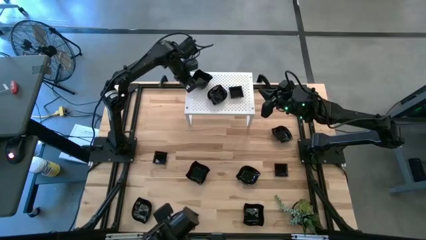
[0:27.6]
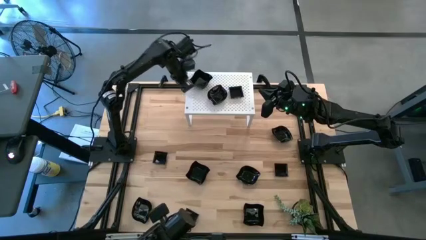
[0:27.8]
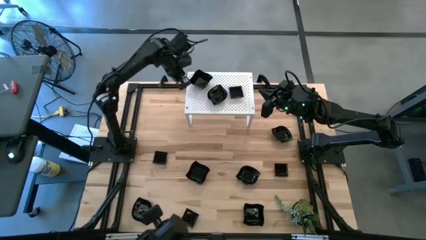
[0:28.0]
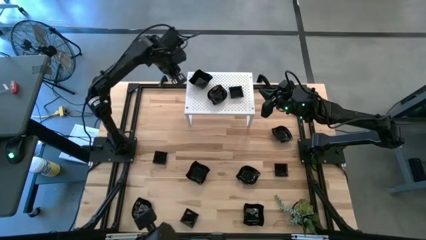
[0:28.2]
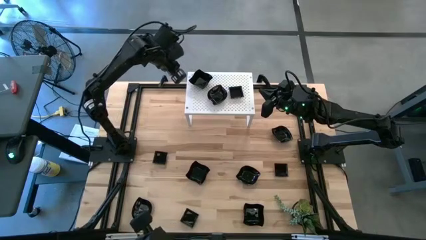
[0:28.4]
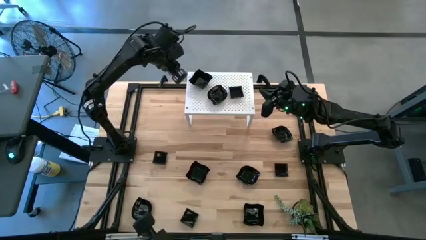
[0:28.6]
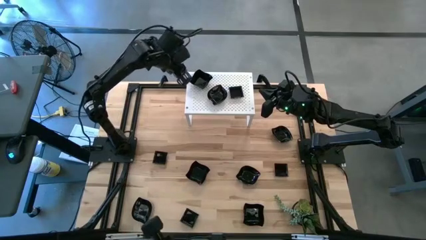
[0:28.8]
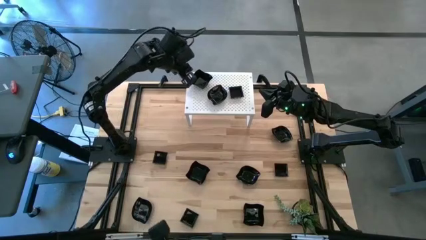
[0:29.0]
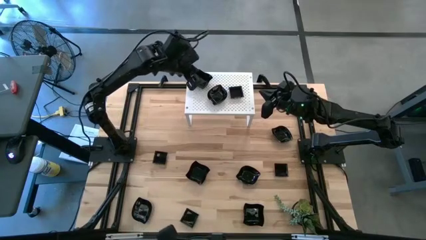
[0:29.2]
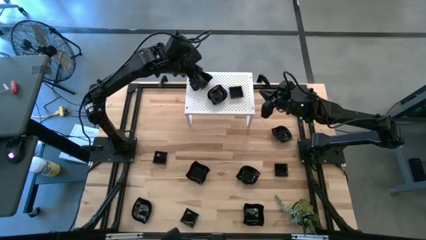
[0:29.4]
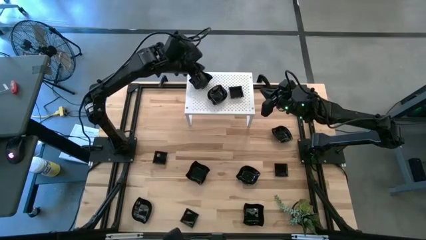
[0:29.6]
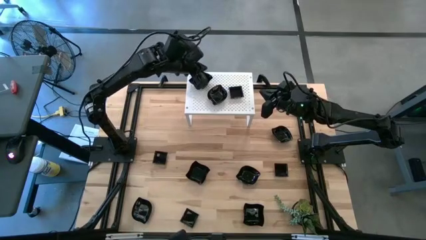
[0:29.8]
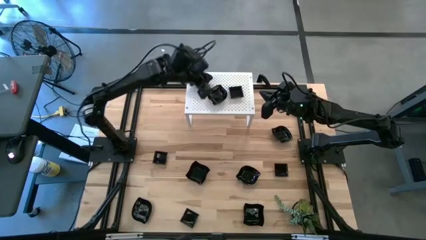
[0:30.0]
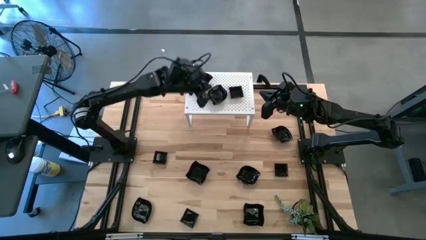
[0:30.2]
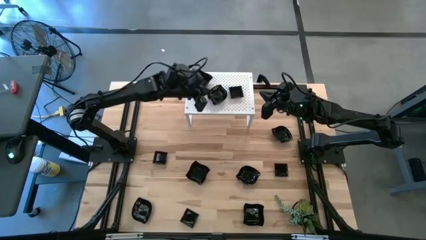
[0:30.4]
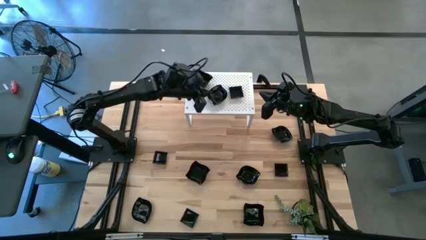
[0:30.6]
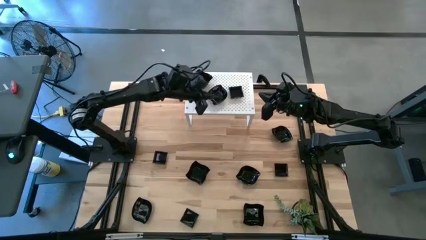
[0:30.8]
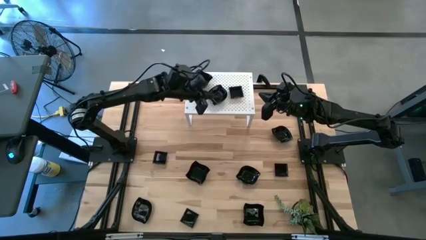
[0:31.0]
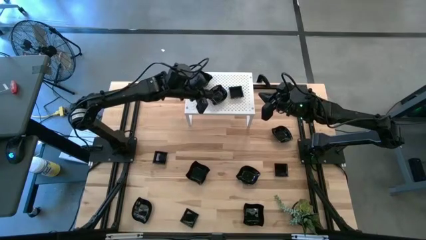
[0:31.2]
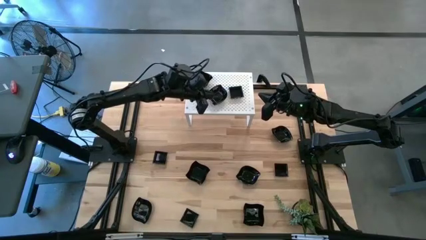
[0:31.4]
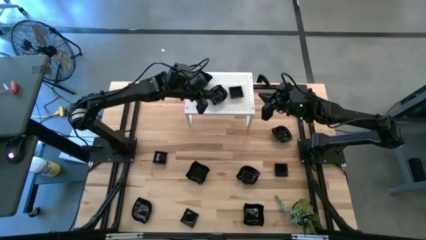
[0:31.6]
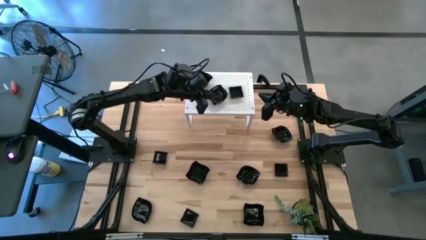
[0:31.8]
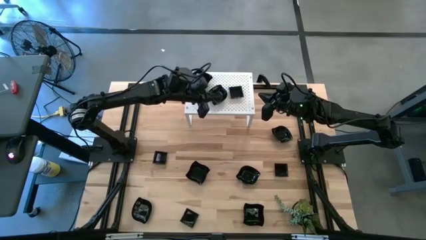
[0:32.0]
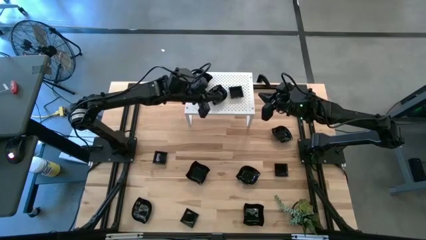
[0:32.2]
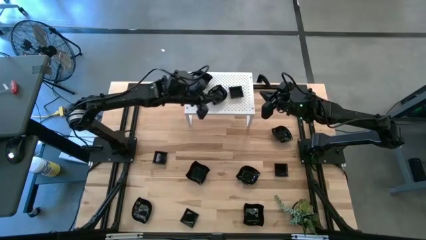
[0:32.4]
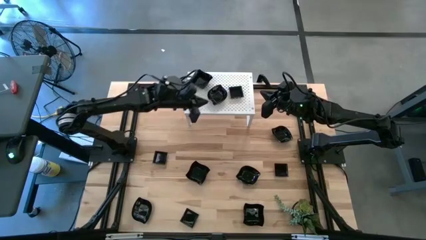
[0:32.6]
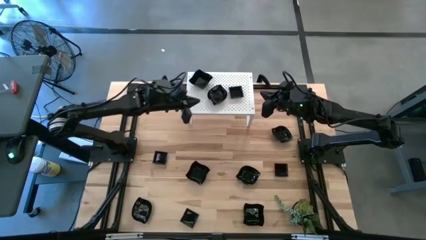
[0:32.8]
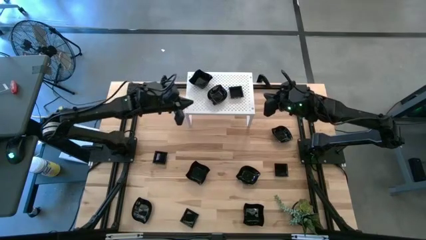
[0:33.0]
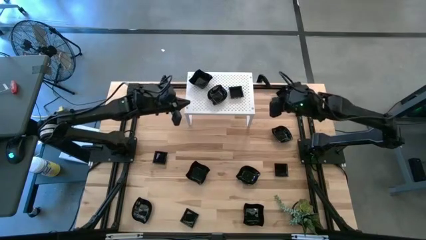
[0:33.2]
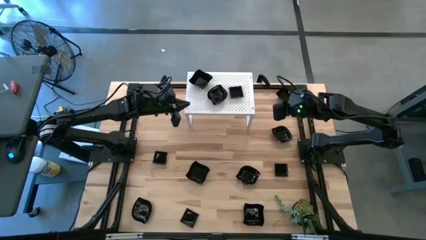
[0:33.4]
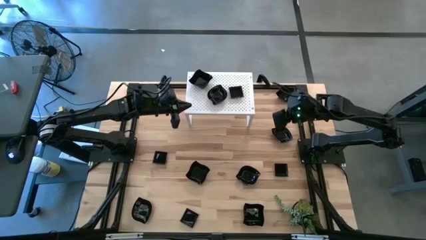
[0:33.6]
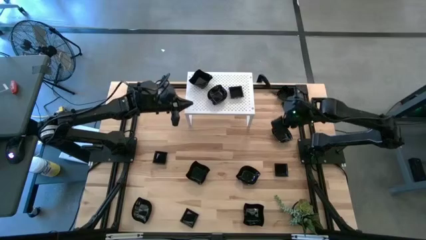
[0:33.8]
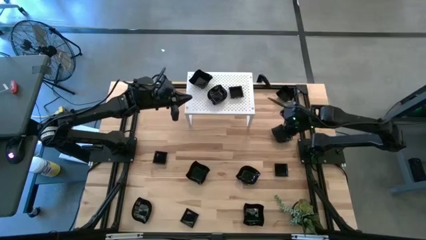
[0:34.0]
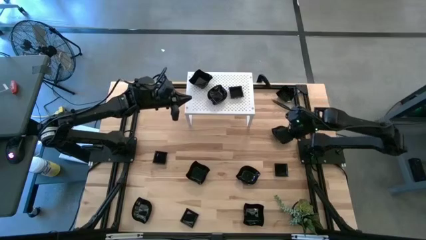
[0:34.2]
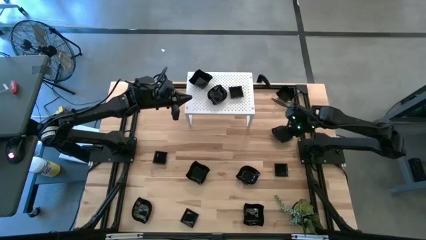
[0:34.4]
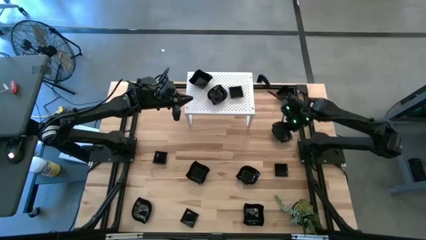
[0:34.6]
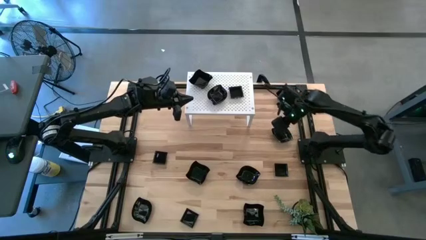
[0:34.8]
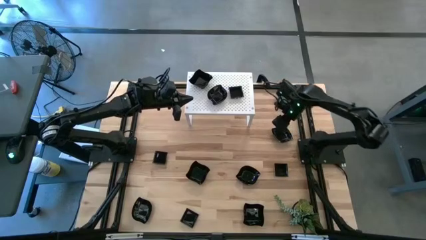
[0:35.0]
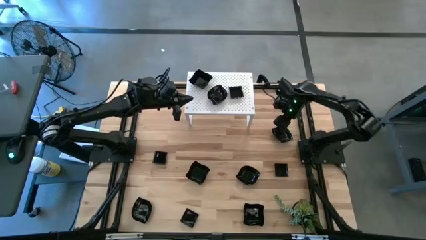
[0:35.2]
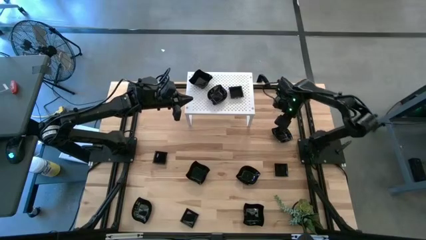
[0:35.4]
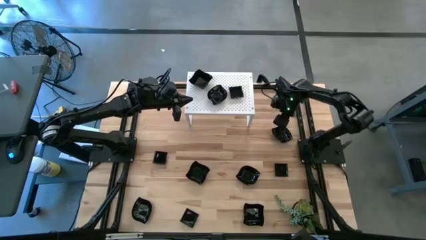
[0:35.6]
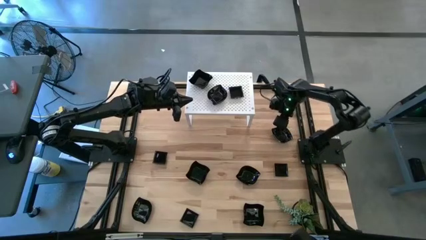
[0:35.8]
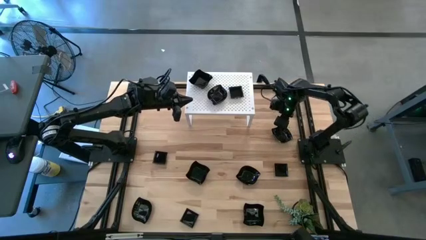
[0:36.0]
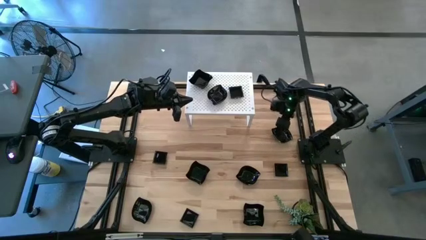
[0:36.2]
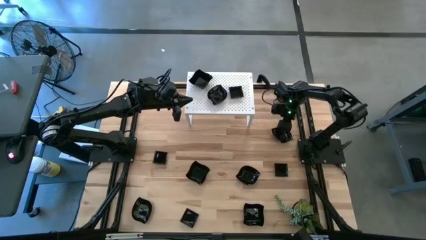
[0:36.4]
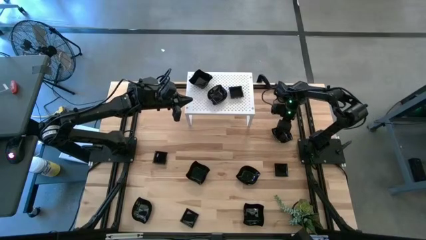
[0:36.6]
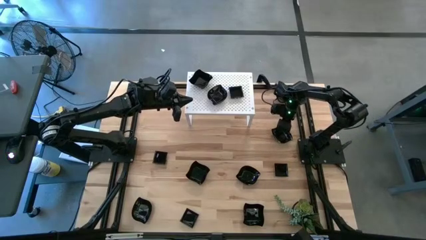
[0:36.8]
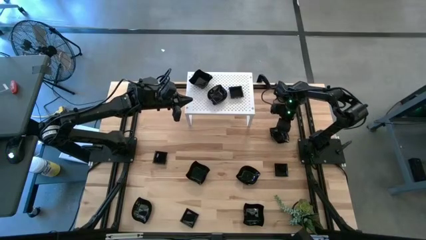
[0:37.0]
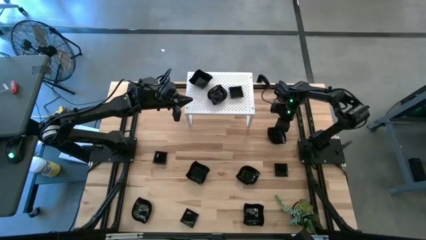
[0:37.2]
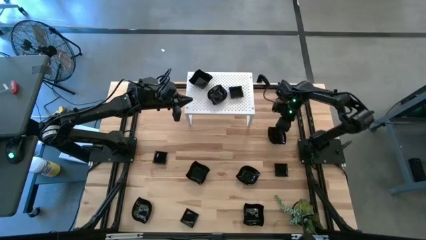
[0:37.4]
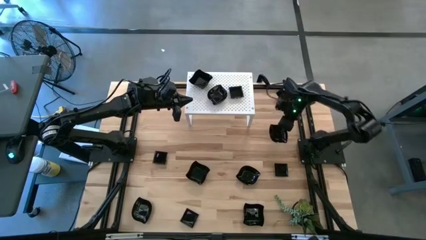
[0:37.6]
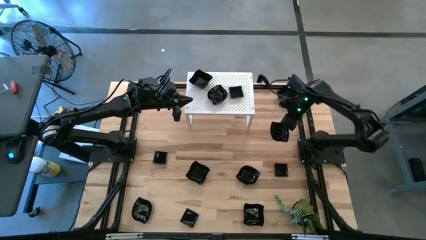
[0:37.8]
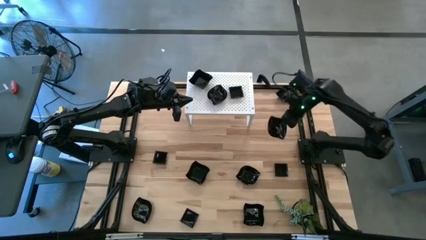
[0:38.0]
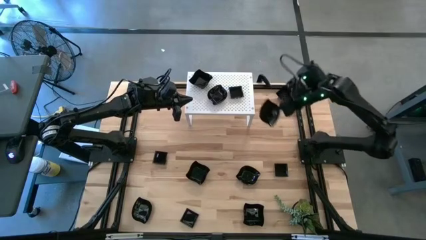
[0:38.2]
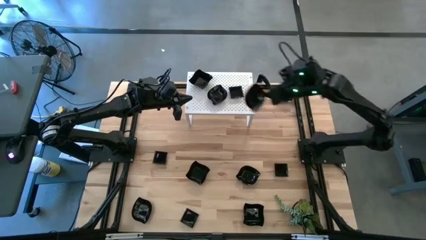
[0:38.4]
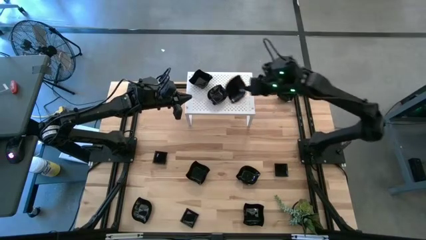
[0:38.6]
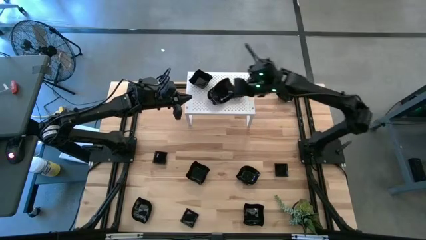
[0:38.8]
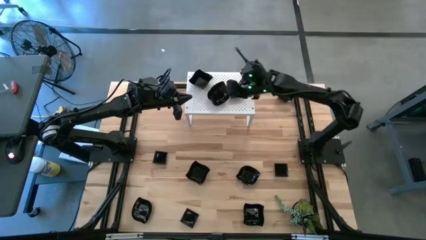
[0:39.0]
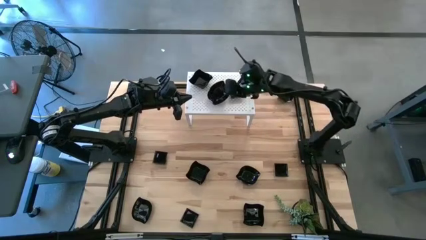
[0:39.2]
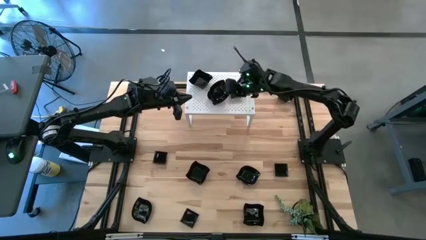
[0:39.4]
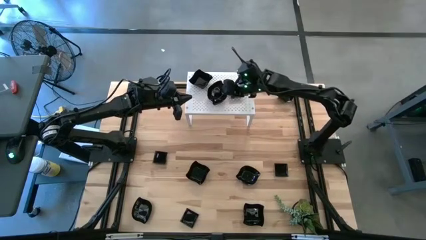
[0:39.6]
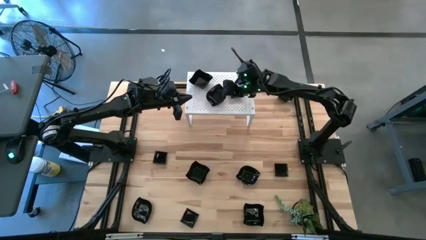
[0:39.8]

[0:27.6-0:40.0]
Task: Pick & Place Mini shaped plates
Stack the black leaf shaped plate on top of the black leaf shaped plate on the shelf
